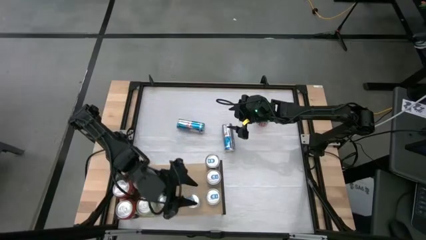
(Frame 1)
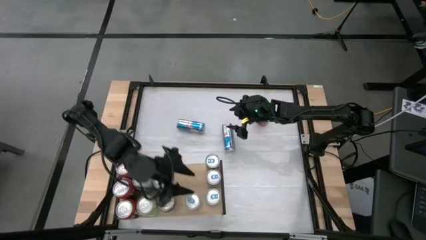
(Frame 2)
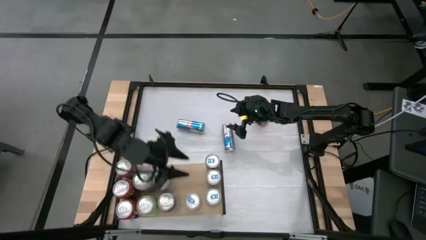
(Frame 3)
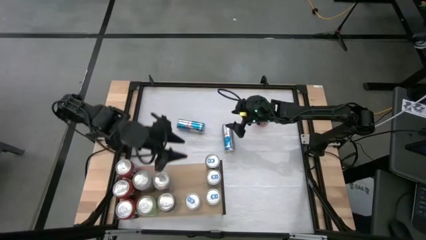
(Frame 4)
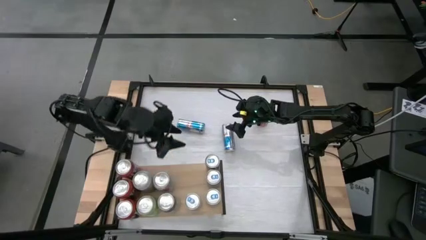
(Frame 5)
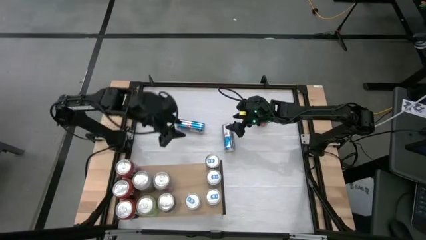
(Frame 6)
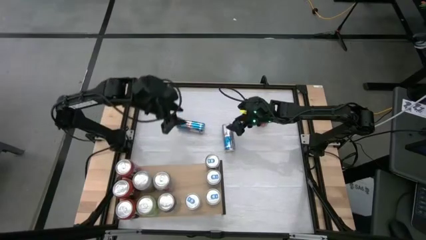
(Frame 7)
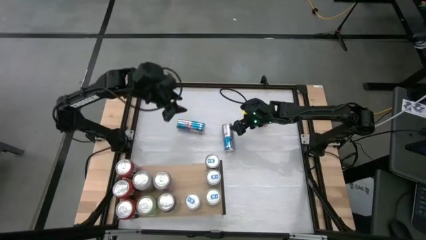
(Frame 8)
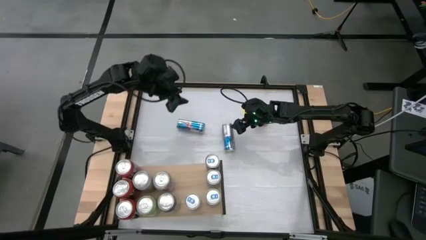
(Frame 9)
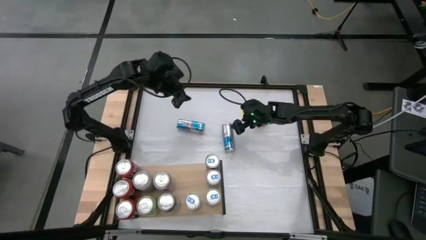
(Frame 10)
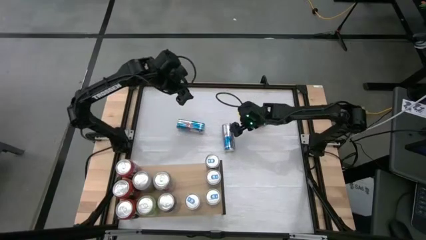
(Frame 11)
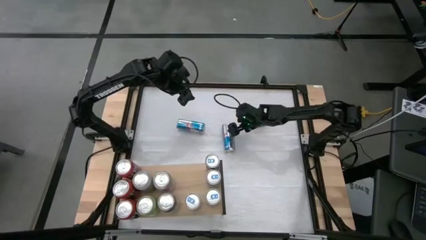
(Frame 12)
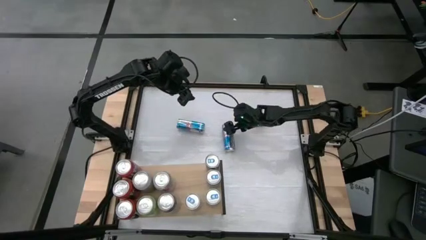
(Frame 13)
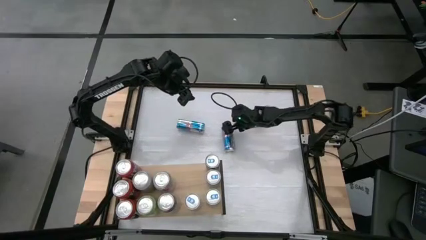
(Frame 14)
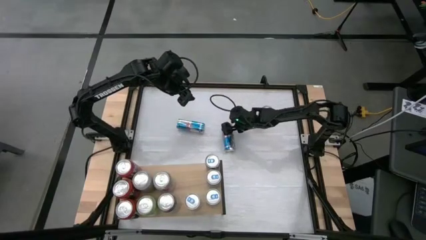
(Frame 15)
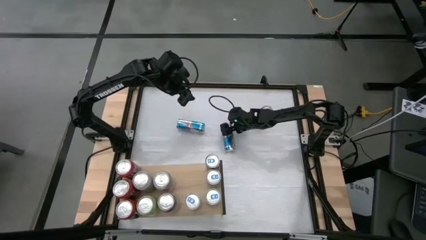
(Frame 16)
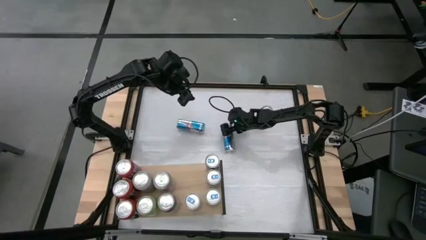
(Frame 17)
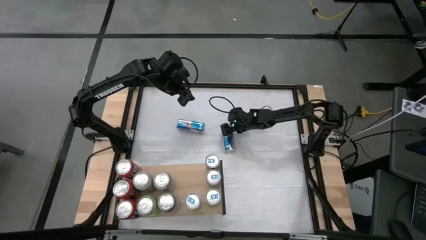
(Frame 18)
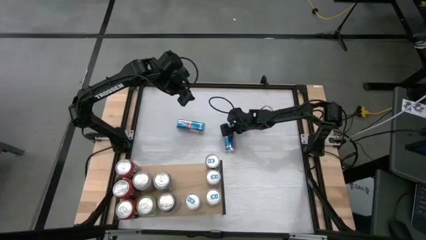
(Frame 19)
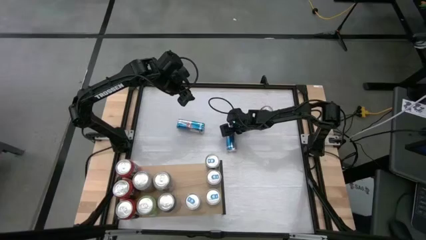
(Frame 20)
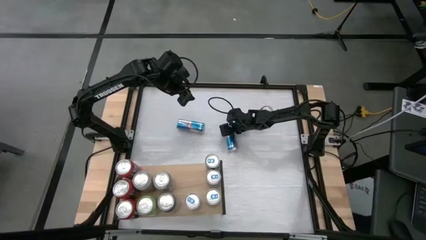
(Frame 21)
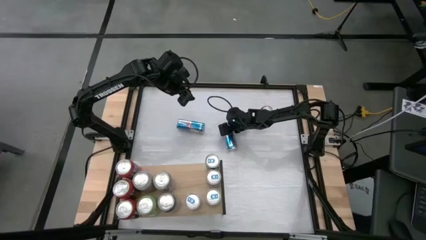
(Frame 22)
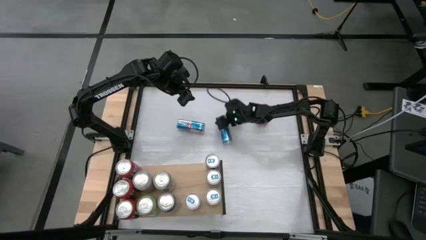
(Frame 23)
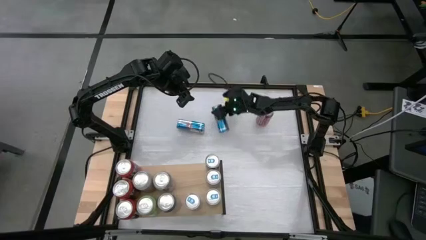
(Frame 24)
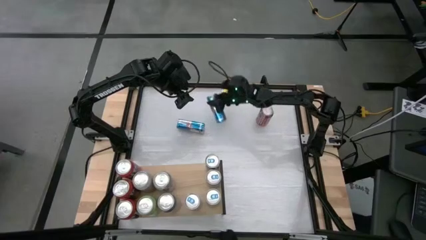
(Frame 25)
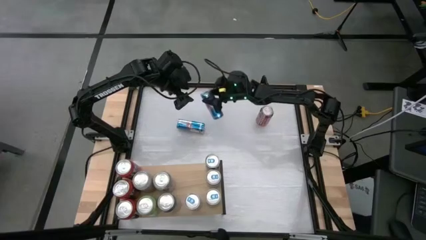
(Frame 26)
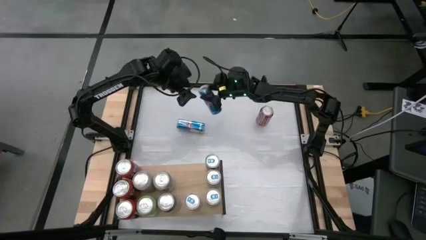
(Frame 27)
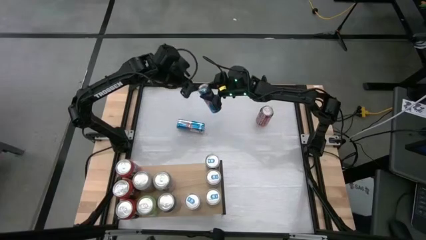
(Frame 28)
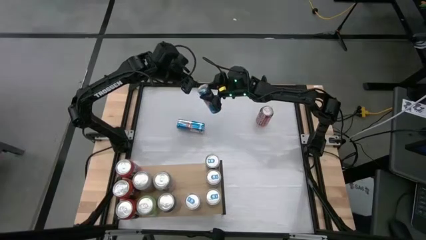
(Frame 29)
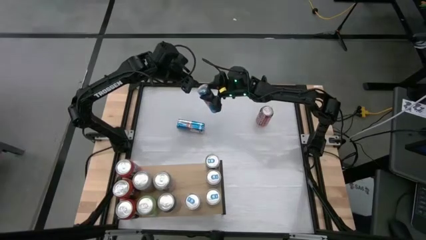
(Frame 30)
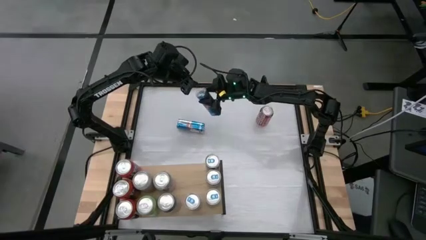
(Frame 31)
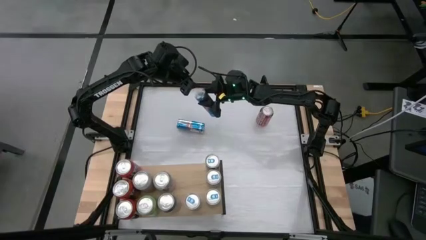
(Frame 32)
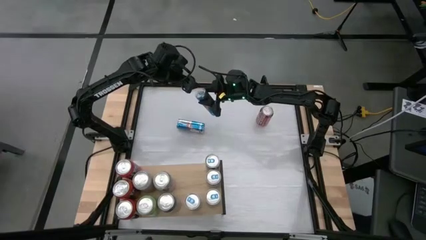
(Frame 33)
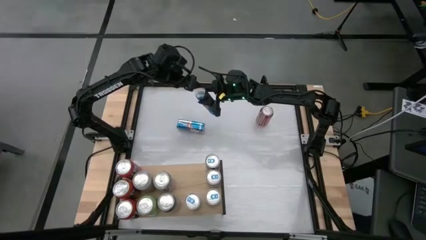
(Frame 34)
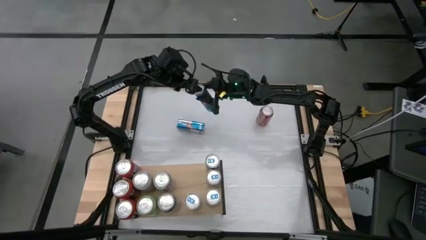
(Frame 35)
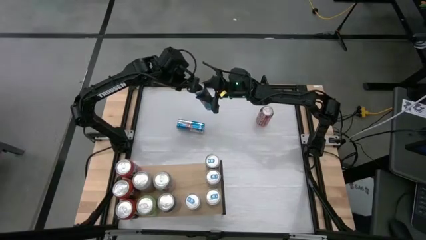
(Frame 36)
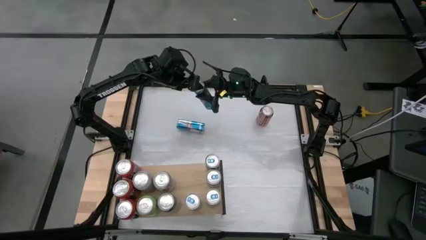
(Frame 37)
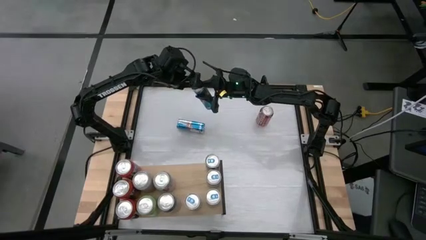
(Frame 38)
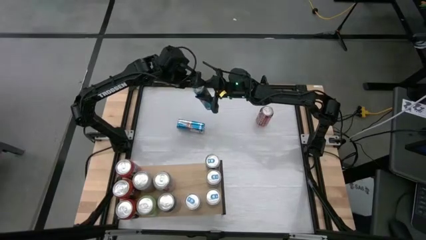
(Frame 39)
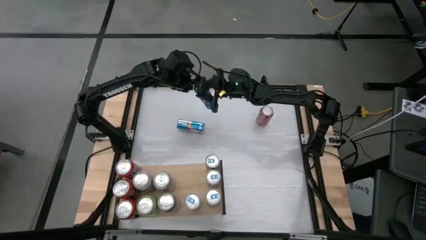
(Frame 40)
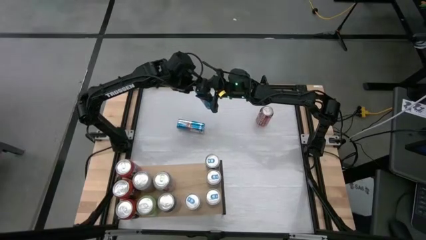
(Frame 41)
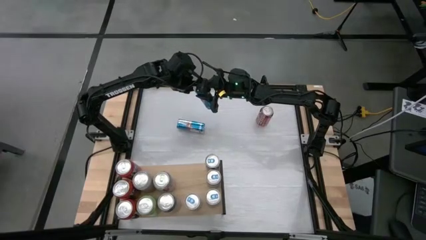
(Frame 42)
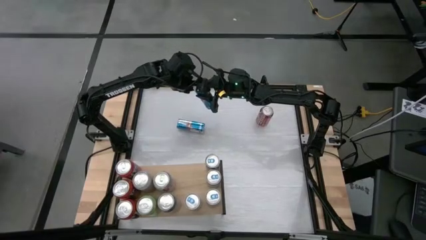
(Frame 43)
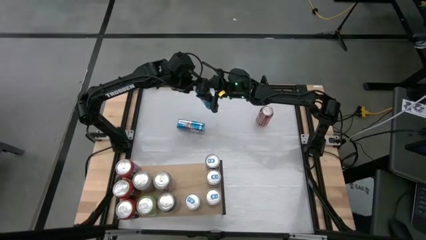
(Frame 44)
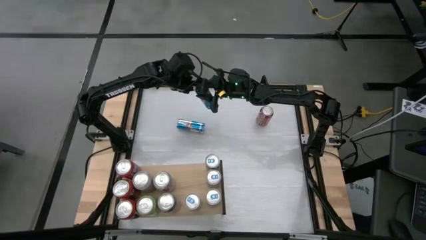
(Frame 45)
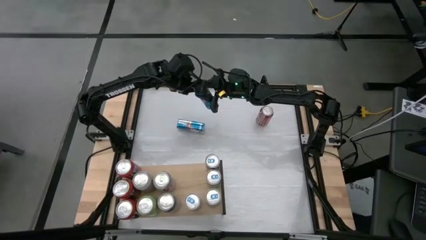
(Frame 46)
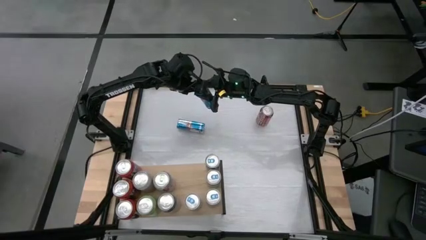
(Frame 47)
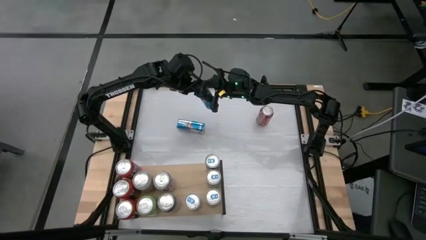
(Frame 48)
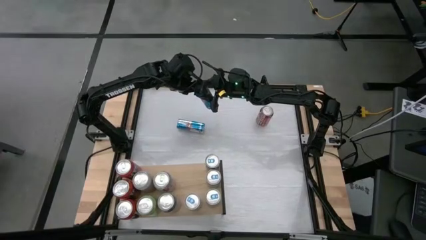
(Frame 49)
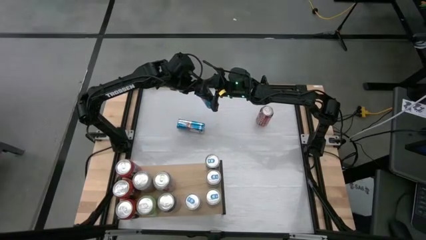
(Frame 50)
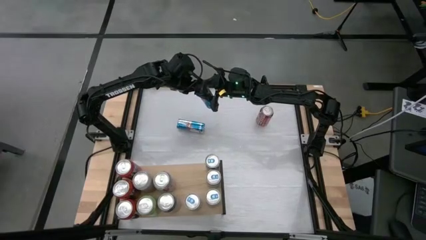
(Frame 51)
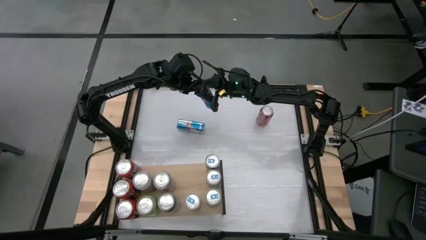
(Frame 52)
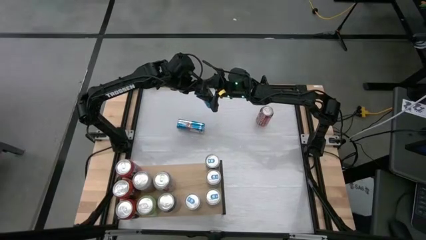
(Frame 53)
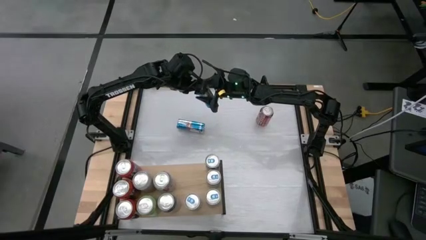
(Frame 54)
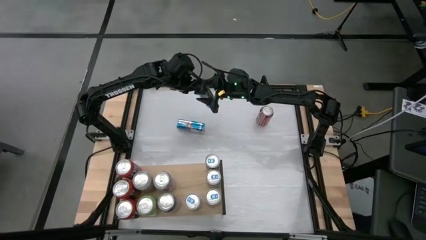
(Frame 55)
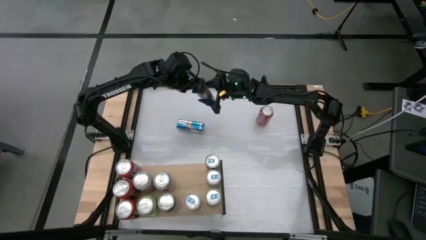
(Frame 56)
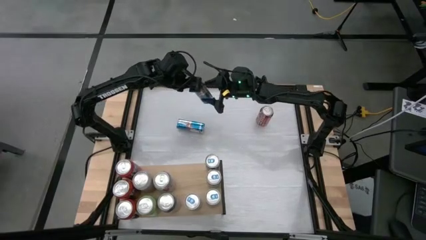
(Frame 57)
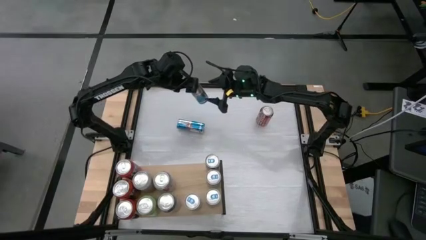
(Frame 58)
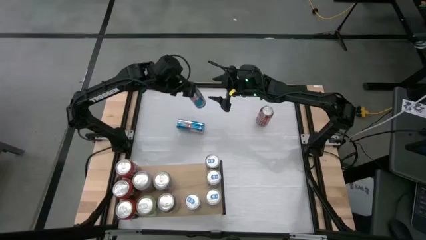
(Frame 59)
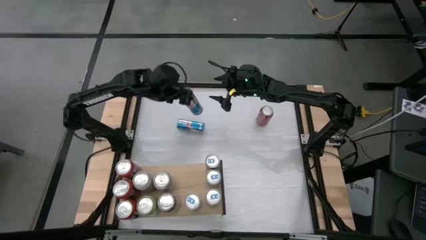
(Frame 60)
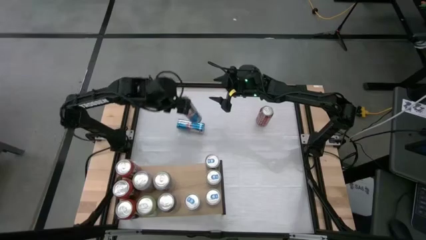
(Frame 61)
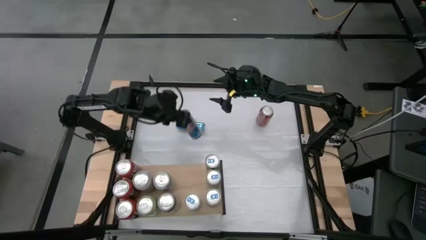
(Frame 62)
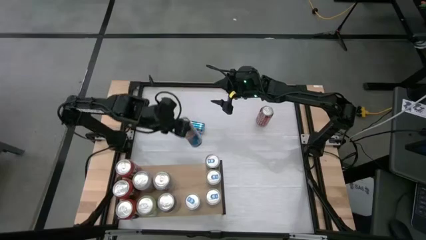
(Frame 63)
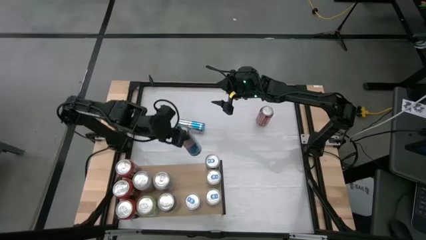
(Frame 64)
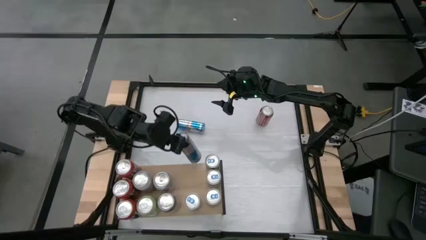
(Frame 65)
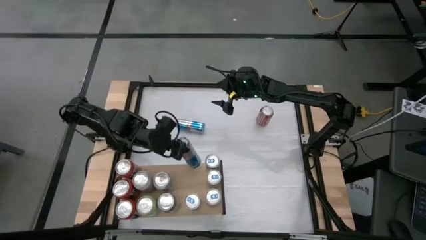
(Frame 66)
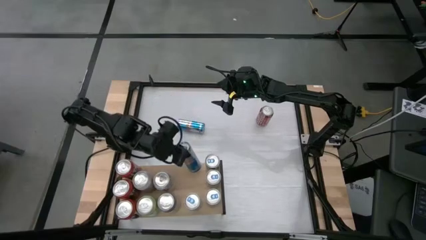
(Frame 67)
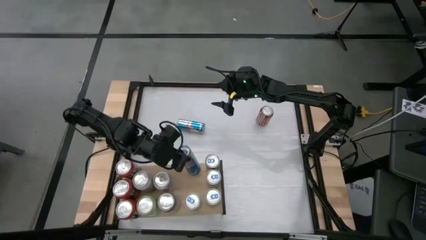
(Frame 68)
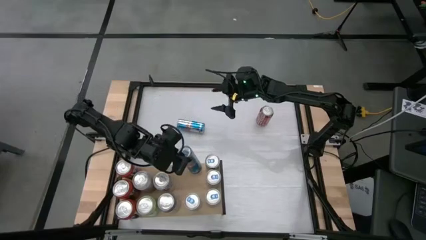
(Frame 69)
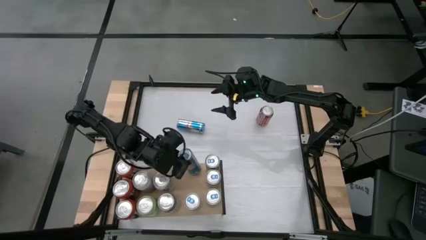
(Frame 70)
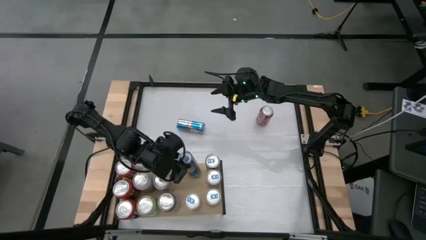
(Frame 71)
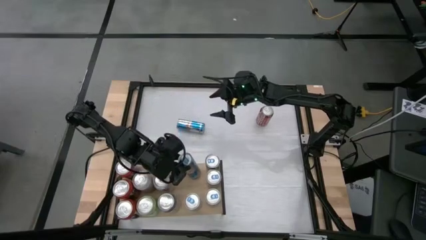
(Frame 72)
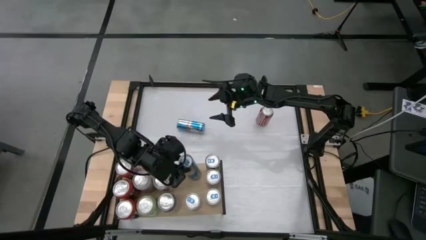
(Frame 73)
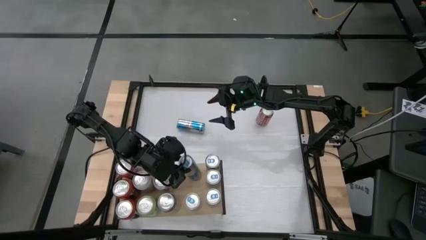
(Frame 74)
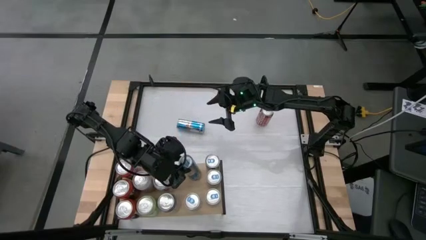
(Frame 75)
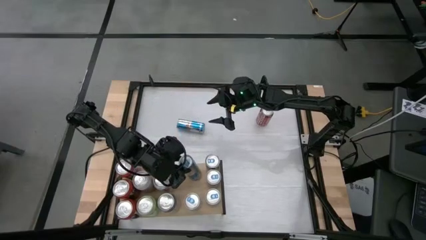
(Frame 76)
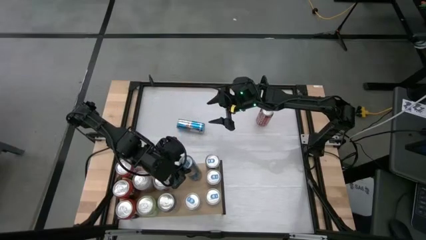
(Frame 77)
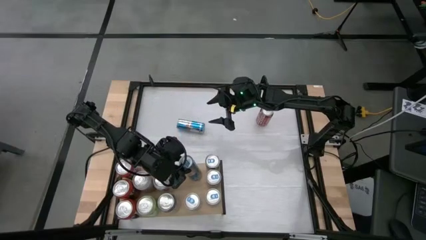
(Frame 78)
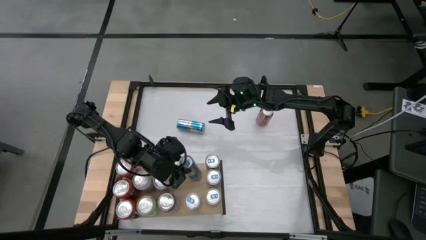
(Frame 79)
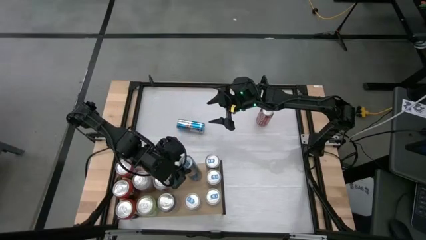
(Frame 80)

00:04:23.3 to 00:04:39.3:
Task: Place canned beverage on shelf
Put the blue soda can on the shelf aligned with the other blue soda cans

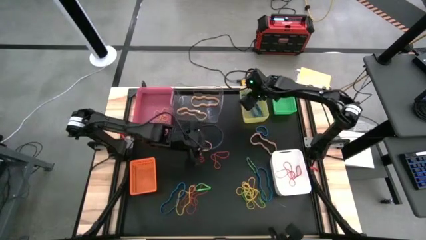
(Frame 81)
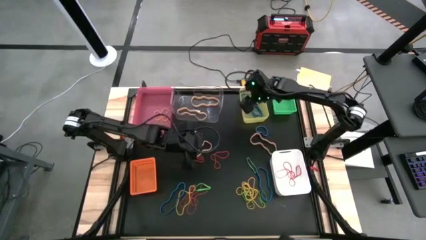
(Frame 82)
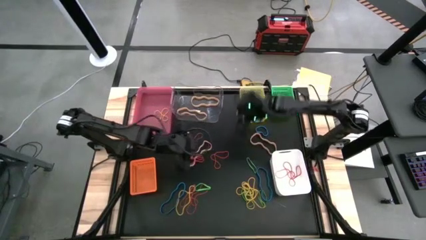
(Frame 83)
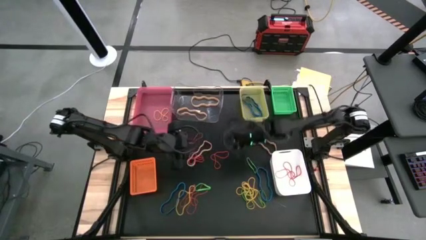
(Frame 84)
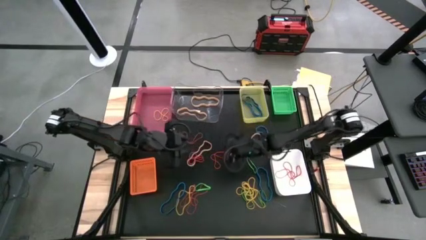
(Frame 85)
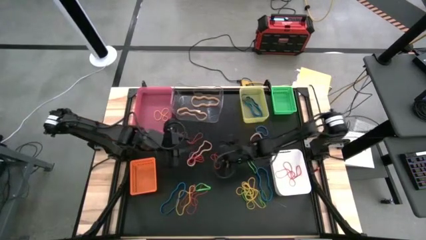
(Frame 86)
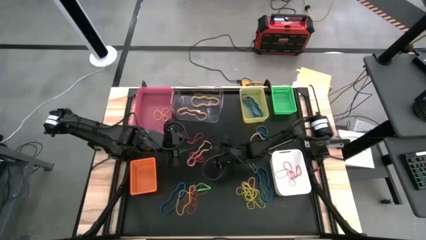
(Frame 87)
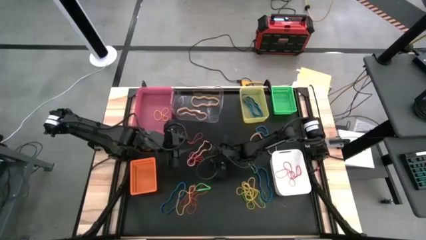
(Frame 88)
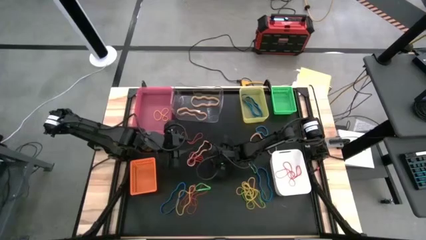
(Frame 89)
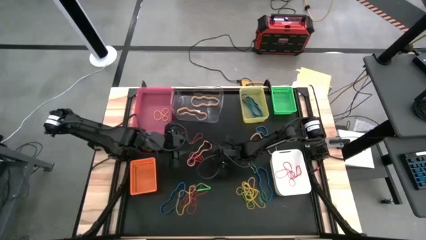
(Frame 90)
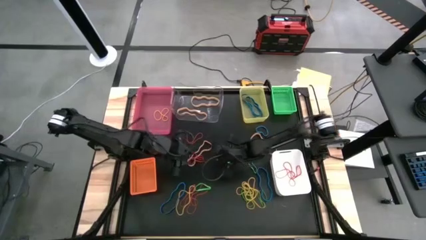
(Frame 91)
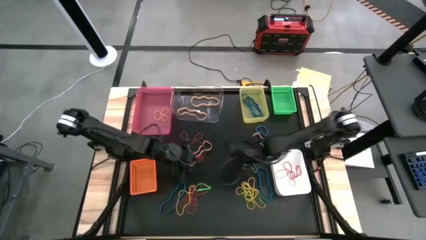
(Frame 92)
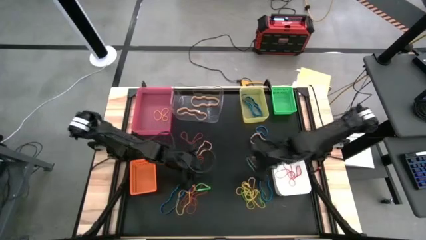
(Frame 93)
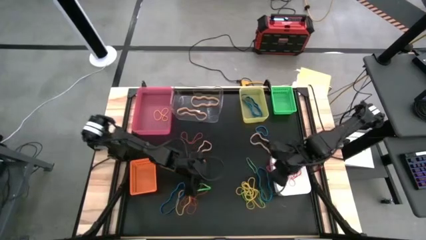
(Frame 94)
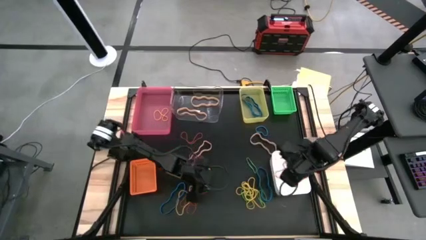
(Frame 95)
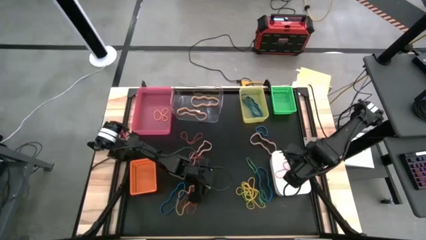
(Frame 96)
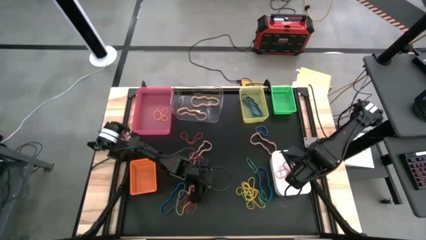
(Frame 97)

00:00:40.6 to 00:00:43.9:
Task: Sort rubber bands into baskets
Put the red rubber band into the white bin
